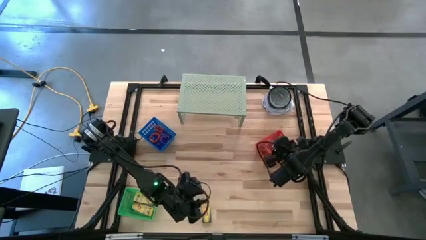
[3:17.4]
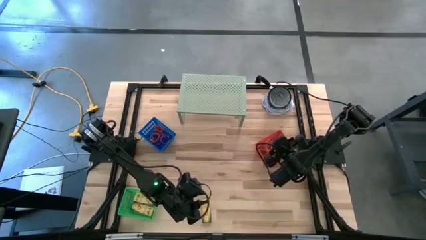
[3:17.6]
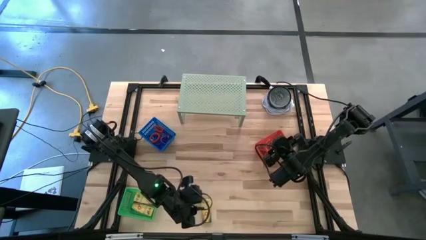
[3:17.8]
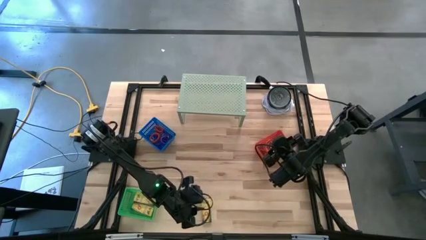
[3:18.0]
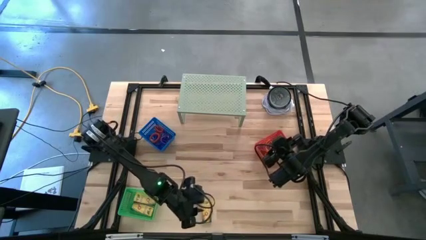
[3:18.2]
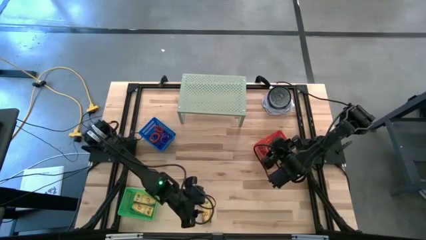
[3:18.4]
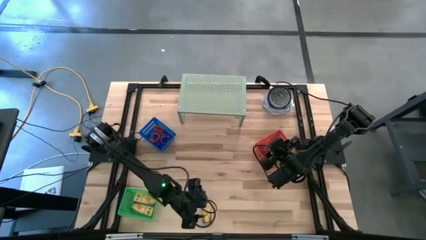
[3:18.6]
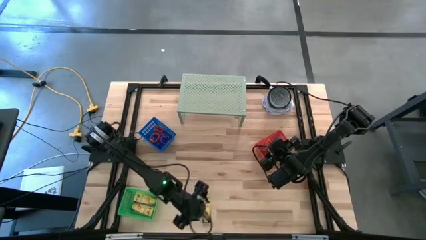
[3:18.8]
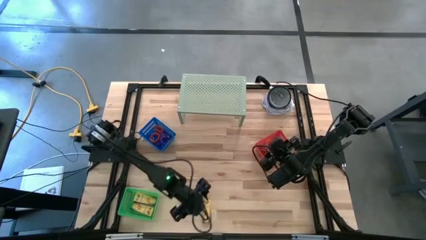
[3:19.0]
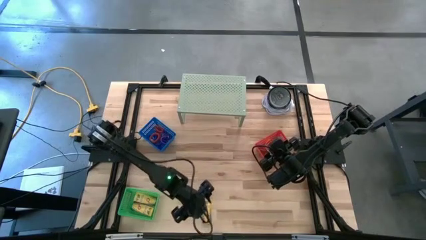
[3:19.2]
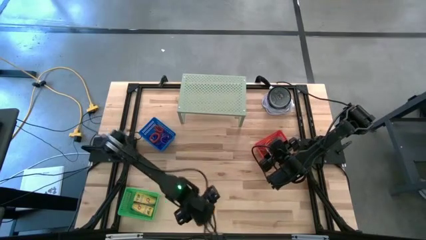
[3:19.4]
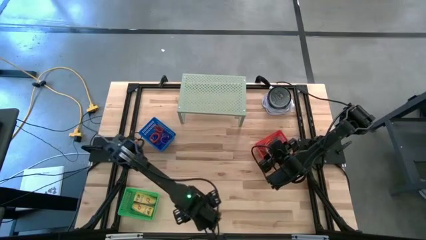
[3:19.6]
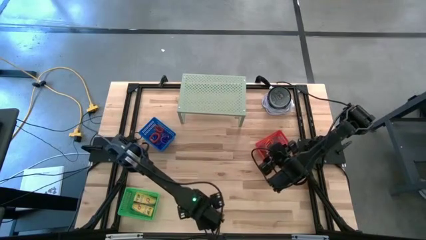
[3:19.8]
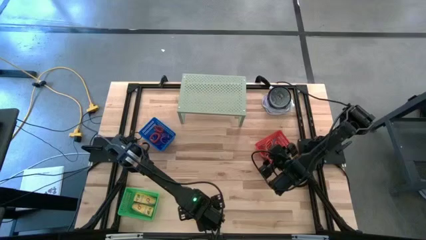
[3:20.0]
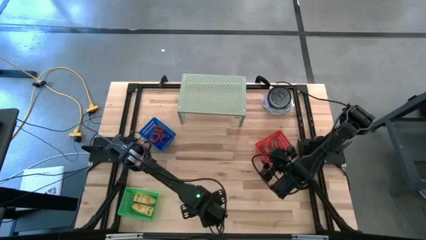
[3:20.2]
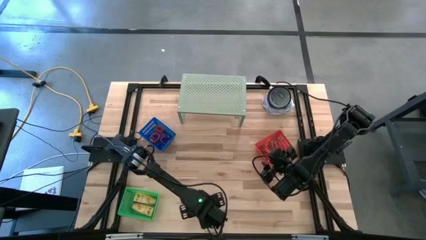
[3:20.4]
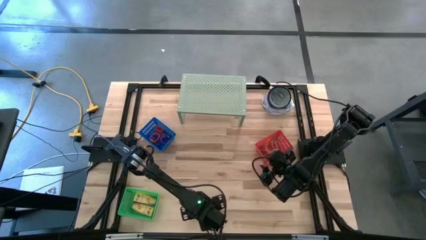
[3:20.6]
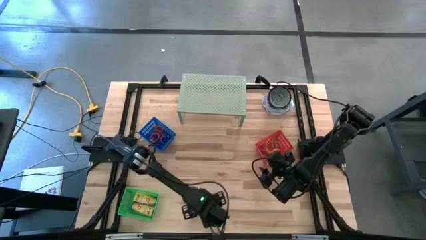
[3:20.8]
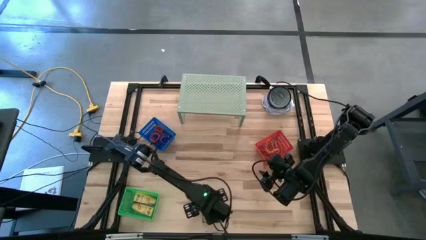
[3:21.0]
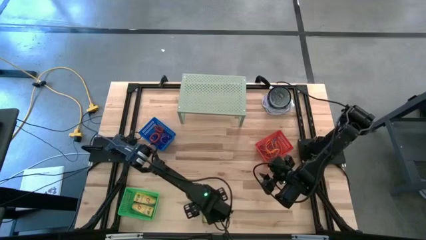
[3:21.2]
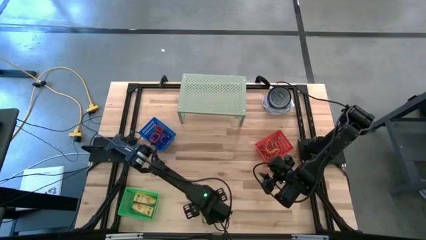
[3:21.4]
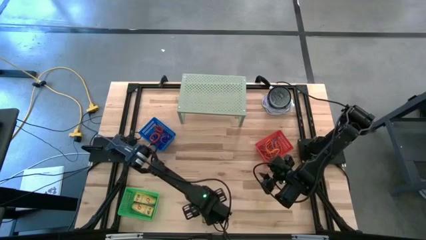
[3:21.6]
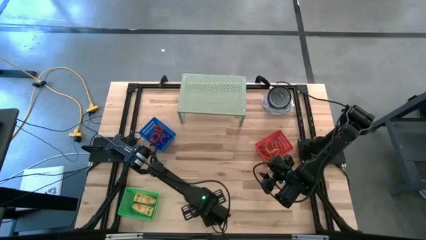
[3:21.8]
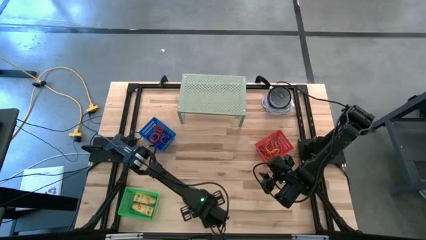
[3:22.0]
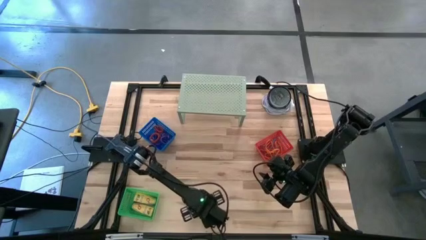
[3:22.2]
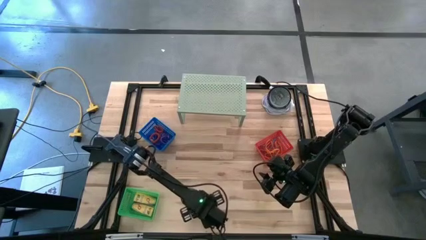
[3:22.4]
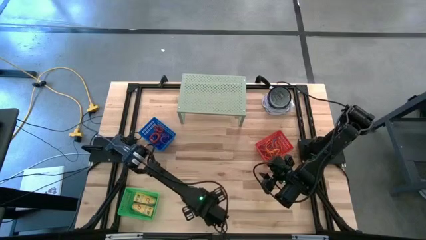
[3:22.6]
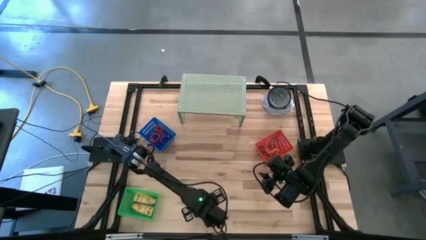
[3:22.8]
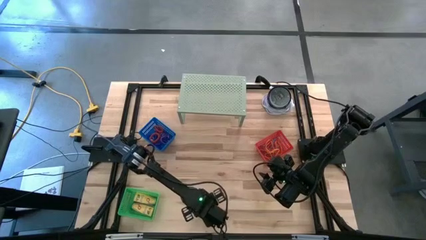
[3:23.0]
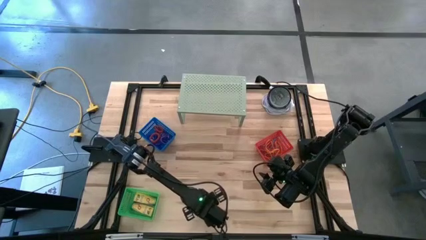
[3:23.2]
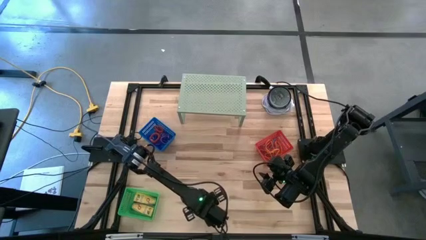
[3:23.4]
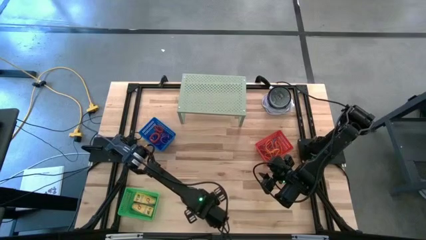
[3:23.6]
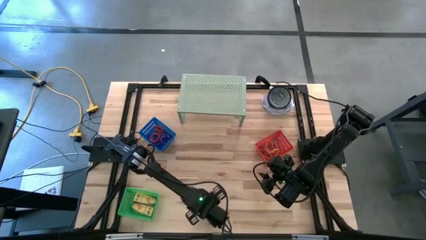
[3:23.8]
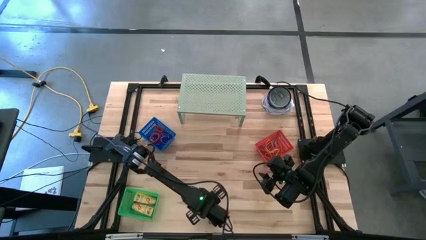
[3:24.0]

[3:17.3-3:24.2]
Task: Pick & Place Office Desk Supplies
Put the crayon box into the green bin

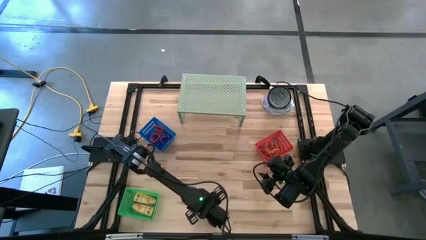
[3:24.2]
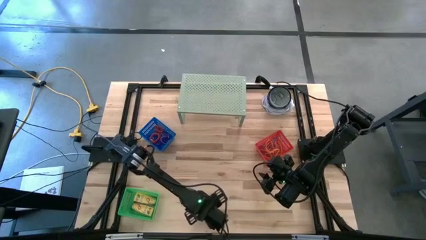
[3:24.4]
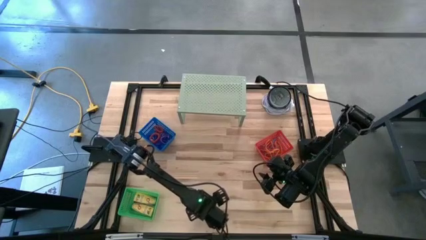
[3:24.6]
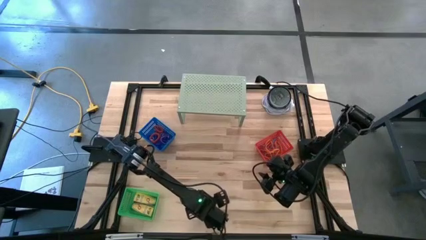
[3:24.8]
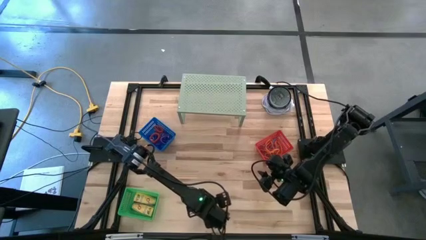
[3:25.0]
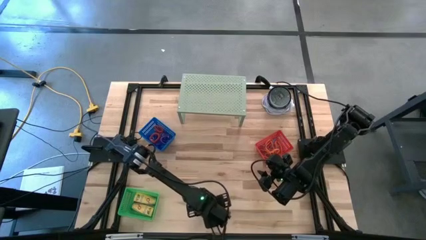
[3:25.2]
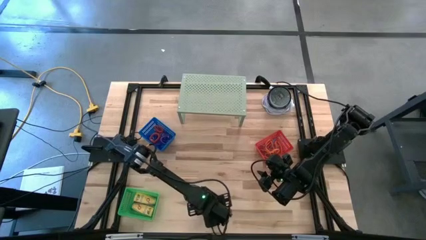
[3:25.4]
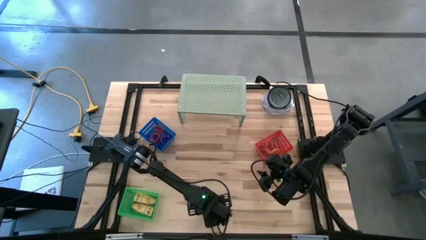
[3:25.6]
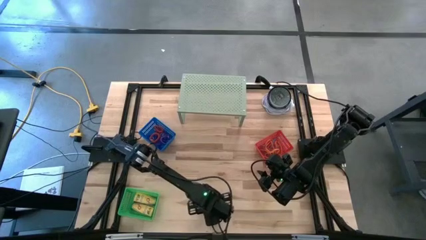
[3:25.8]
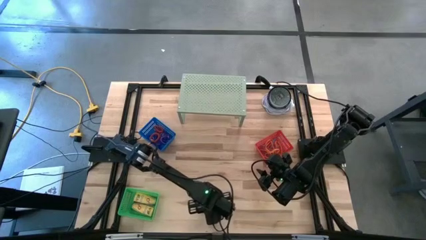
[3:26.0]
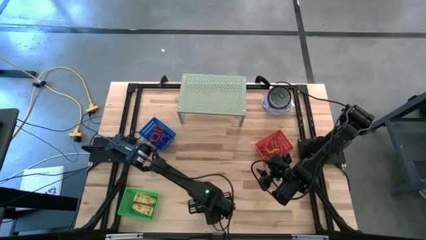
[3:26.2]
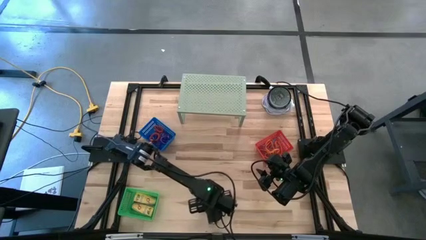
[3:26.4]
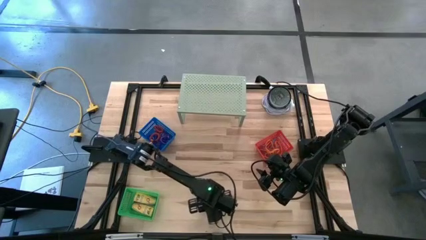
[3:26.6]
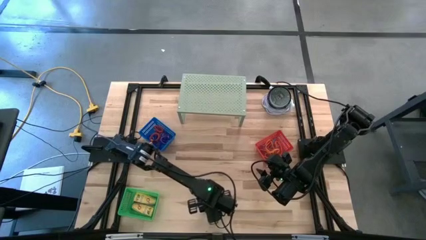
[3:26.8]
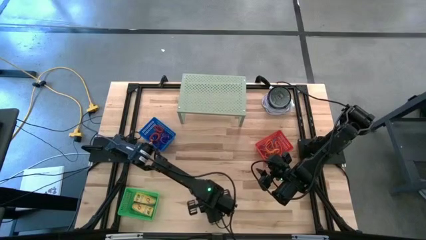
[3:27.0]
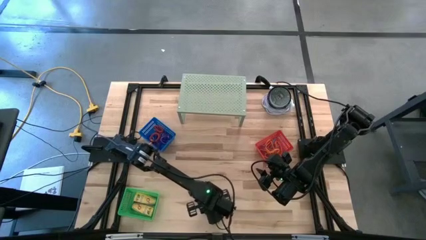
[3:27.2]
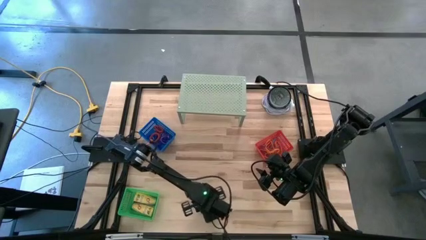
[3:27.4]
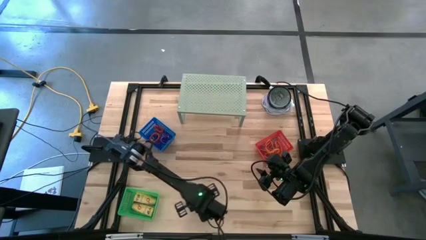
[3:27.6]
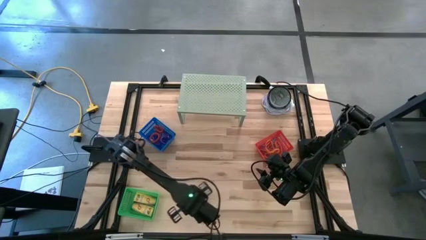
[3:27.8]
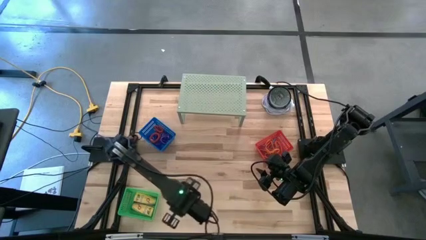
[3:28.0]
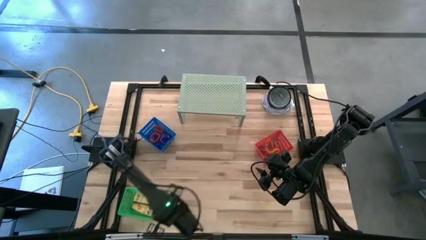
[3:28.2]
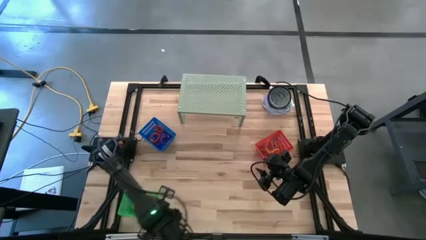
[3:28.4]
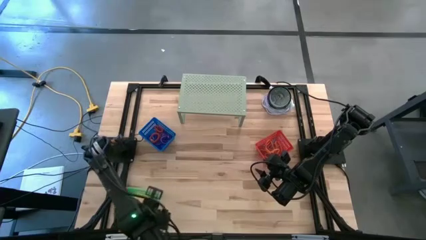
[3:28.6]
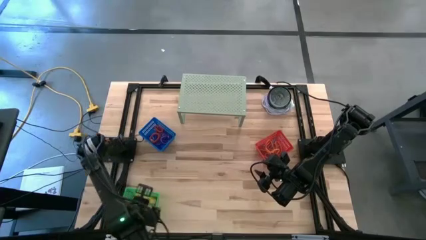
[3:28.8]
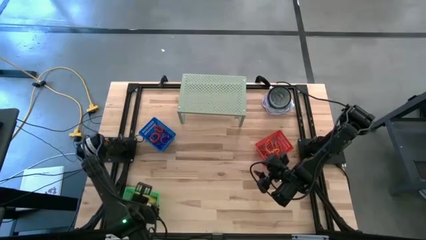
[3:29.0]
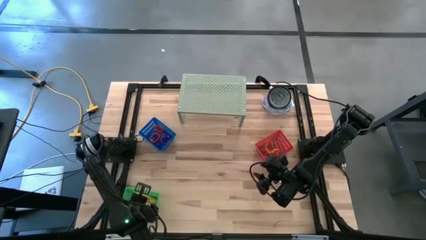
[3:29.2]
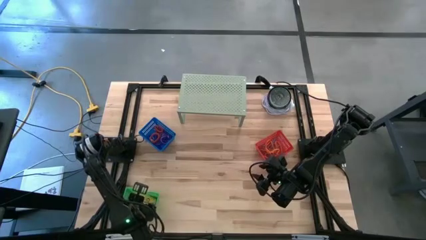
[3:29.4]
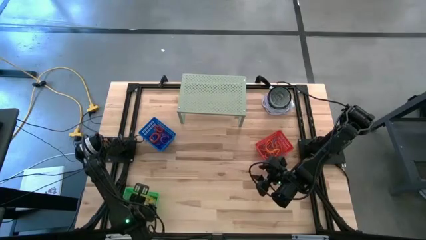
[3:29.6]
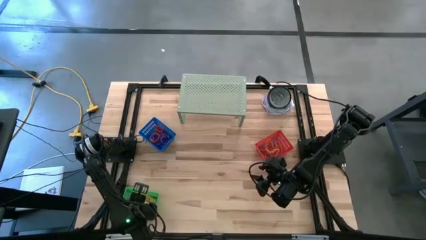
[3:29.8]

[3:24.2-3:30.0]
Put the crayon box into the green bin

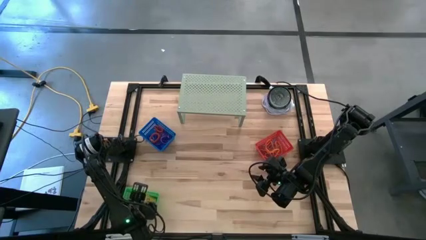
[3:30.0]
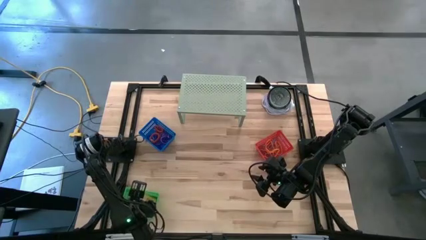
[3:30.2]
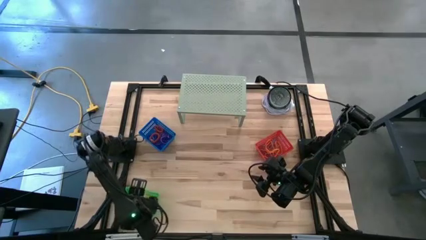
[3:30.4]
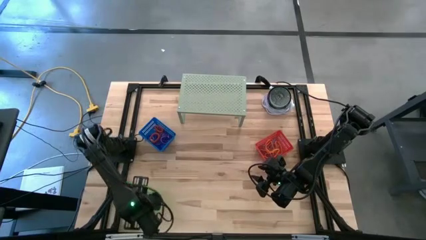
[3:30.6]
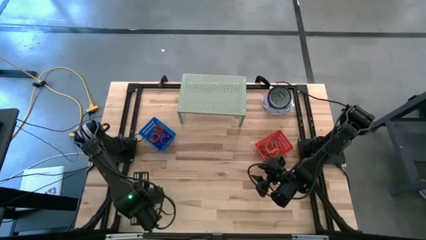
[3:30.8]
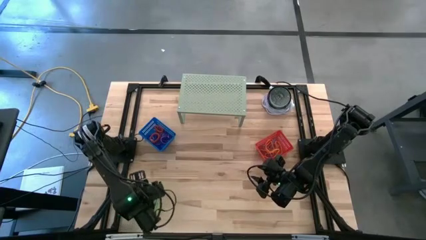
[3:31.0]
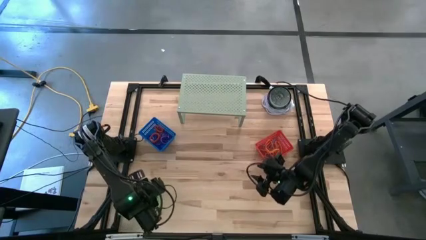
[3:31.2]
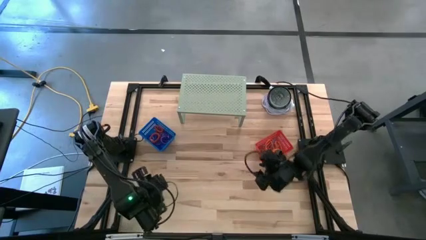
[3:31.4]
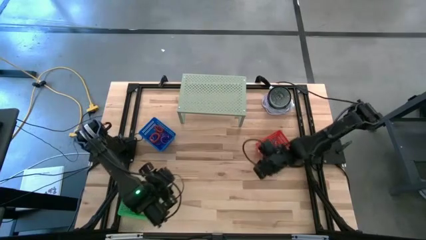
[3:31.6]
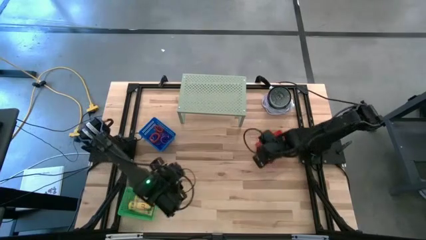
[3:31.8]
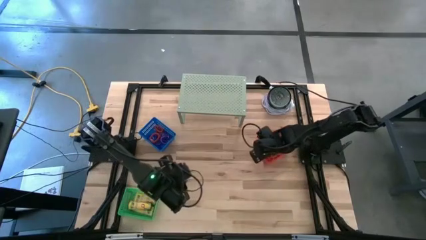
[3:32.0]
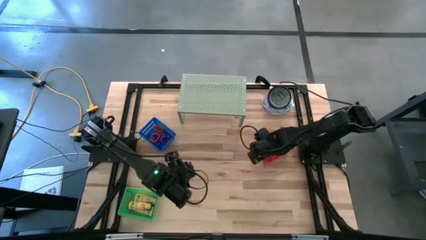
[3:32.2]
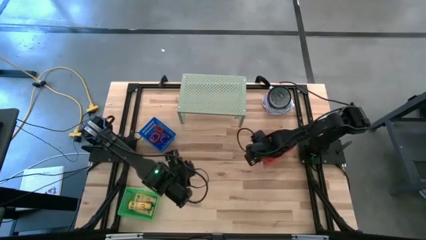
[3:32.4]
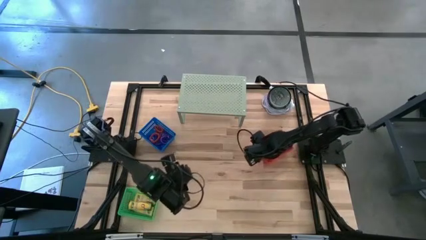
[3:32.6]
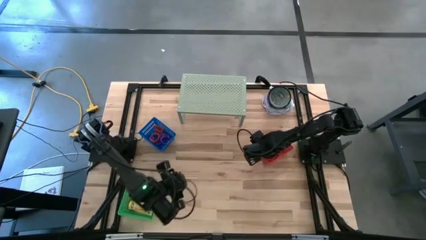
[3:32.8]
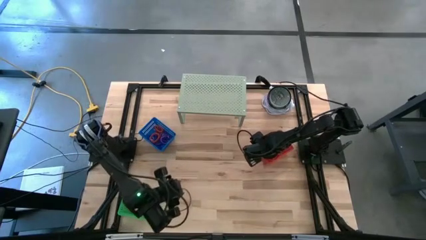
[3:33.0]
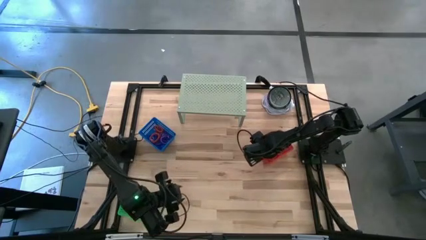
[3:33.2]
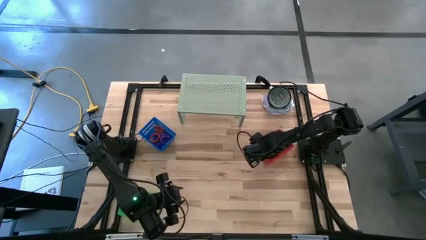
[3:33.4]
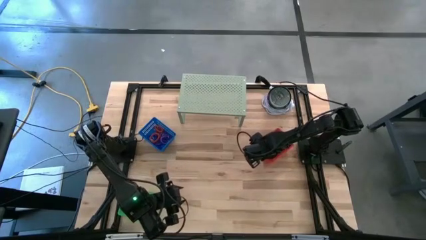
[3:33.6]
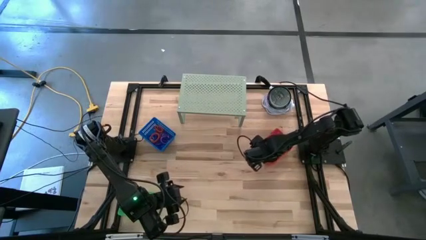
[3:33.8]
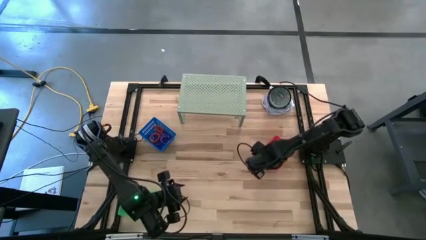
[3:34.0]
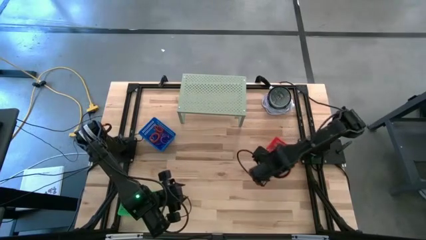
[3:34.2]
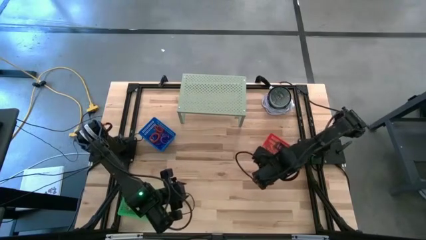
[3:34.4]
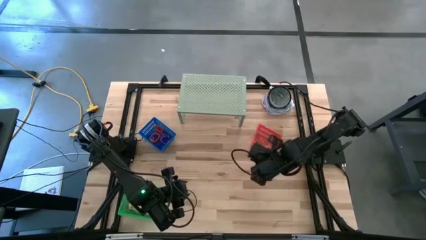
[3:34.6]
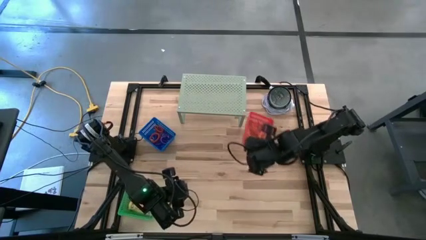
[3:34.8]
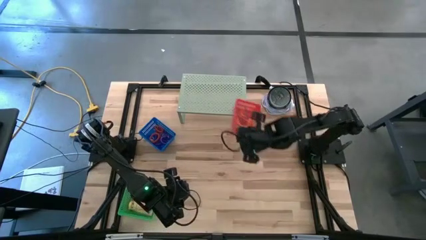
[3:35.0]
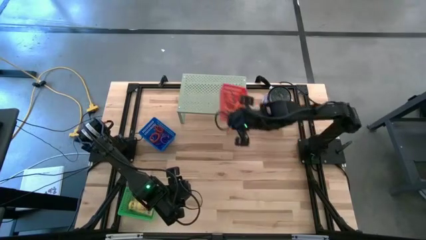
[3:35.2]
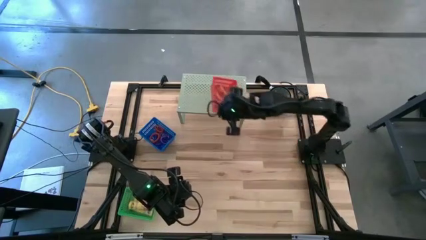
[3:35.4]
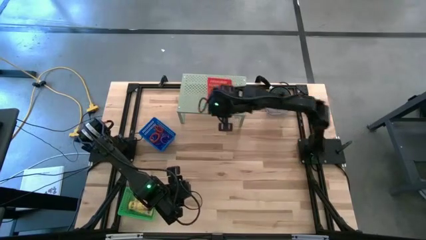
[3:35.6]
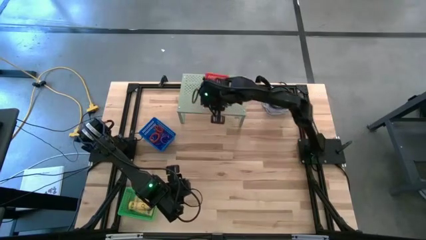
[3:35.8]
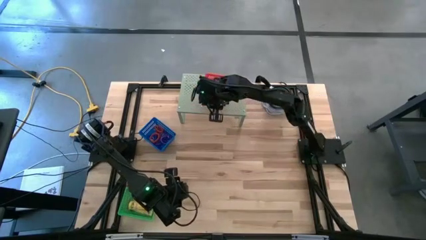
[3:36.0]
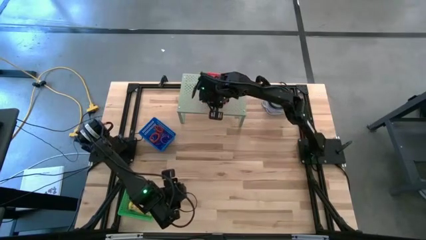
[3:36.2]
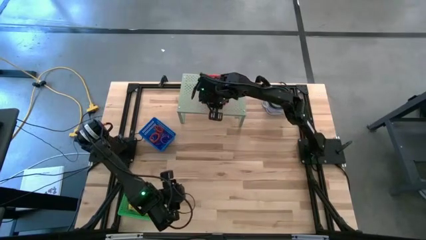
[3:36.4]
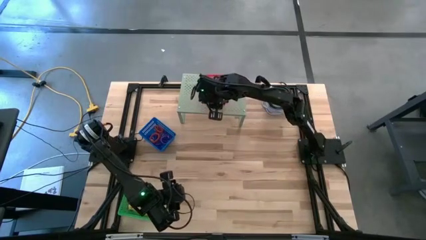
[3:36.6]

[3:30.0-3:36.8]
Put the red bin with rubberbands on the shelf
